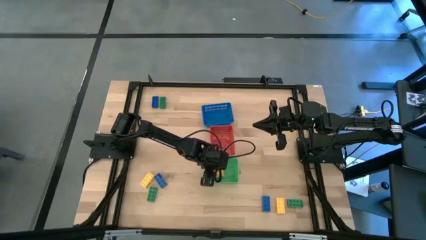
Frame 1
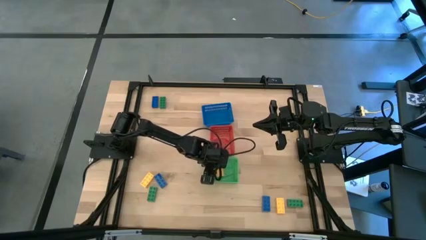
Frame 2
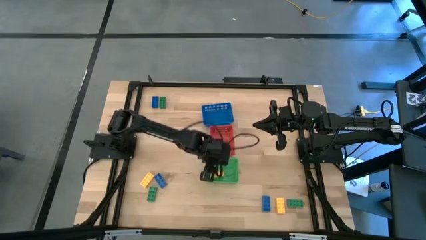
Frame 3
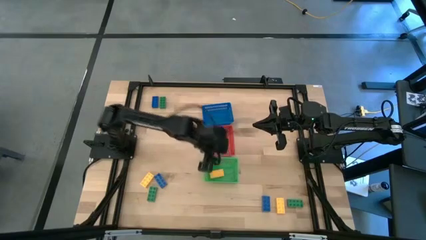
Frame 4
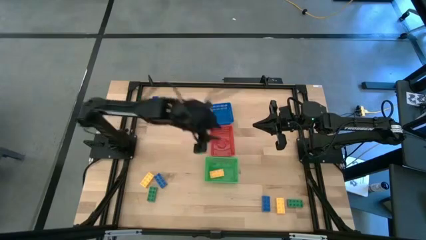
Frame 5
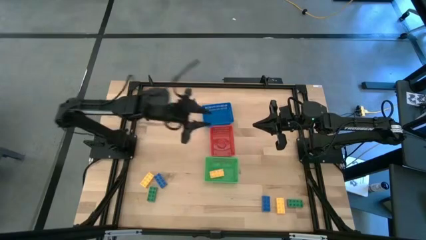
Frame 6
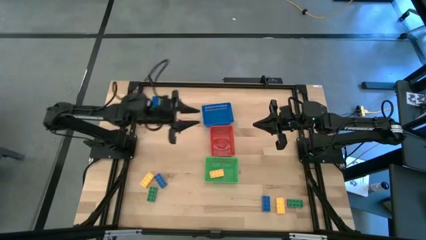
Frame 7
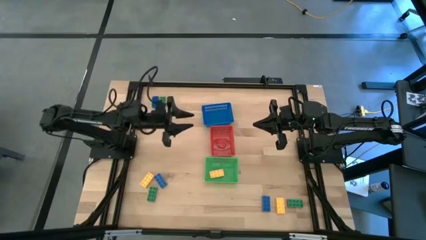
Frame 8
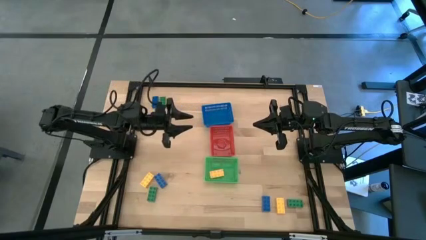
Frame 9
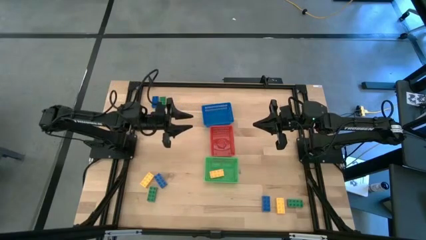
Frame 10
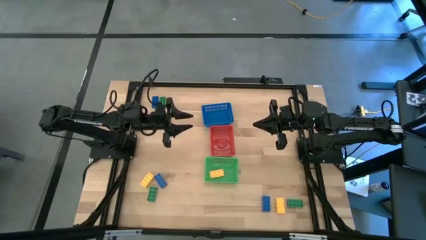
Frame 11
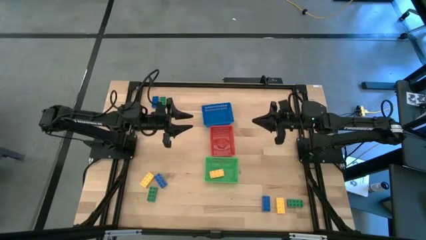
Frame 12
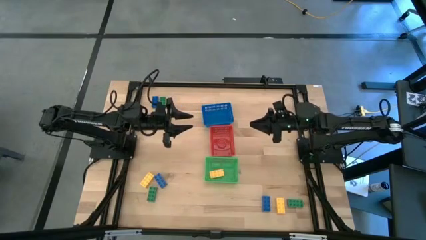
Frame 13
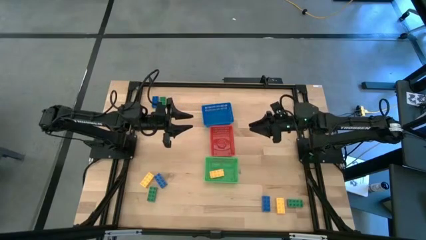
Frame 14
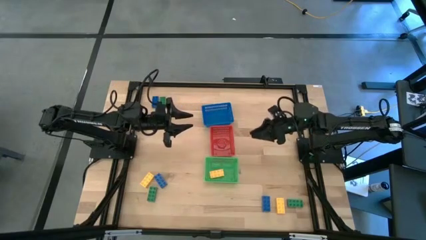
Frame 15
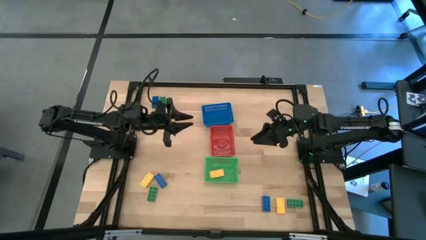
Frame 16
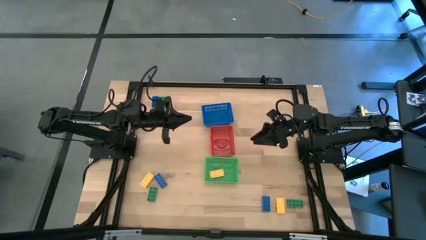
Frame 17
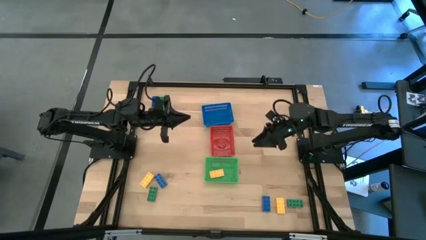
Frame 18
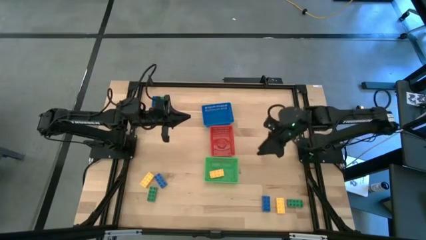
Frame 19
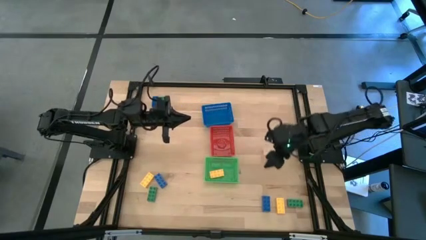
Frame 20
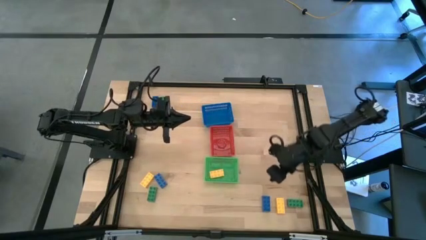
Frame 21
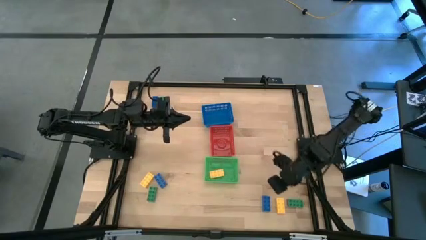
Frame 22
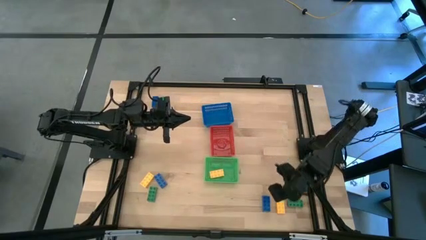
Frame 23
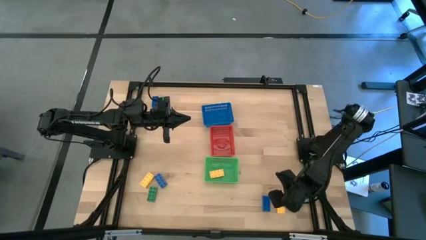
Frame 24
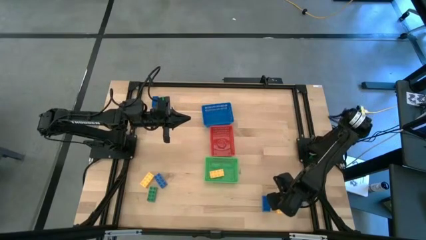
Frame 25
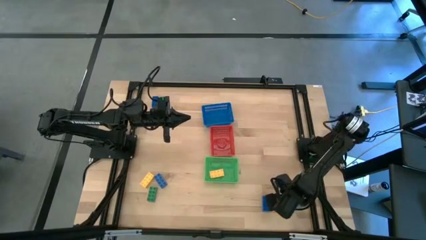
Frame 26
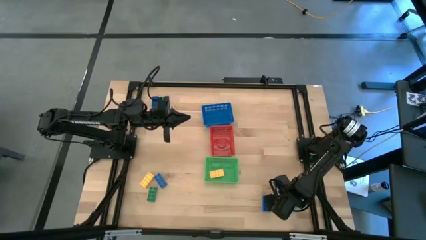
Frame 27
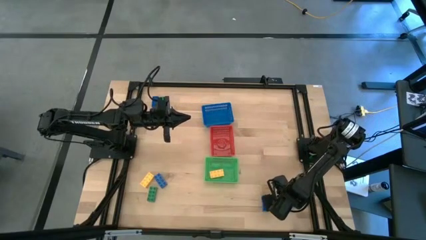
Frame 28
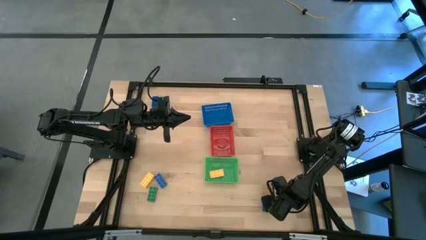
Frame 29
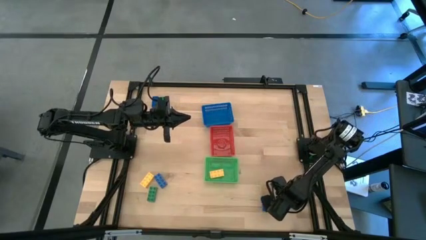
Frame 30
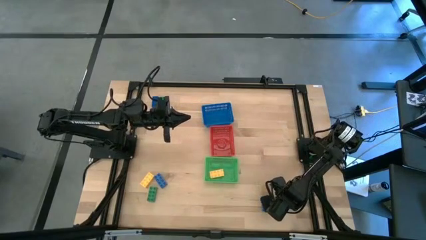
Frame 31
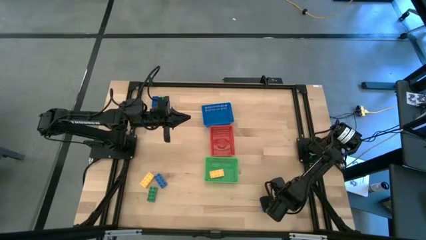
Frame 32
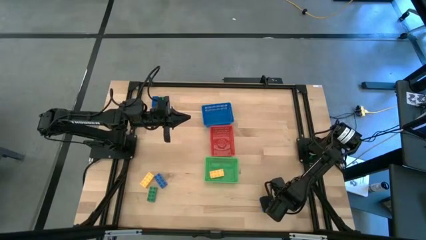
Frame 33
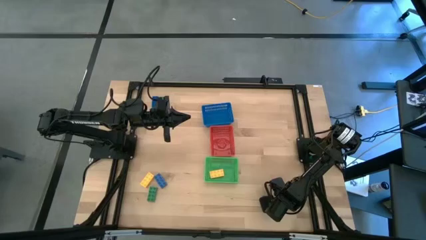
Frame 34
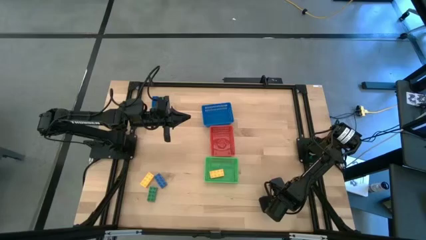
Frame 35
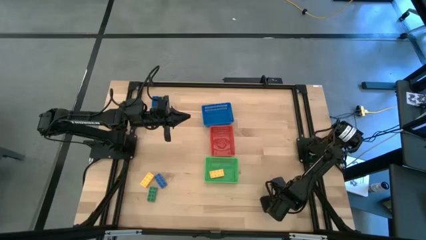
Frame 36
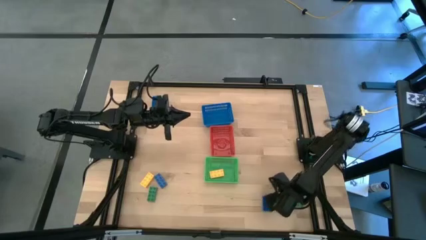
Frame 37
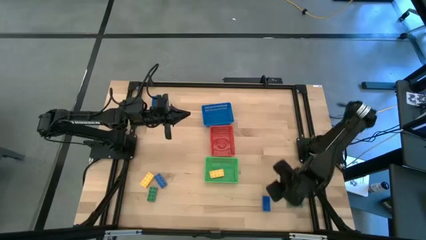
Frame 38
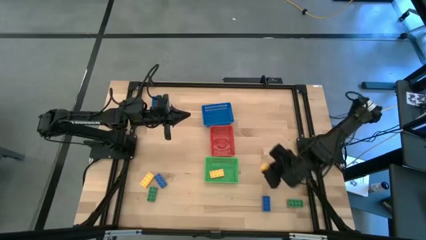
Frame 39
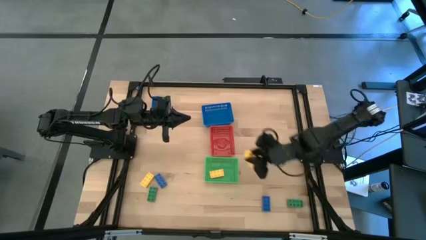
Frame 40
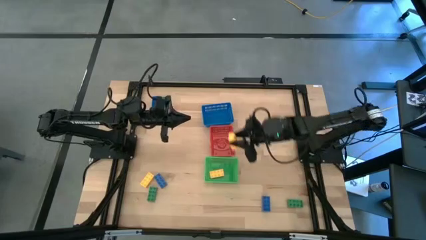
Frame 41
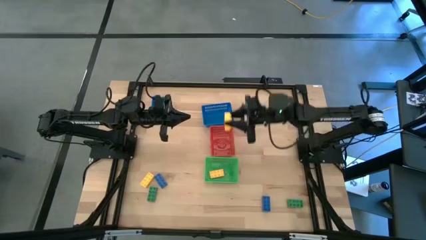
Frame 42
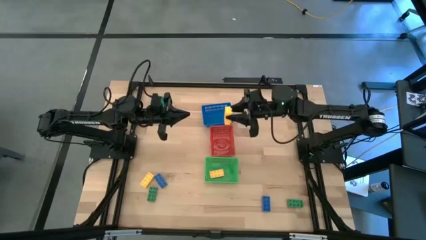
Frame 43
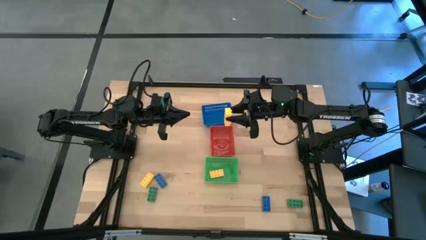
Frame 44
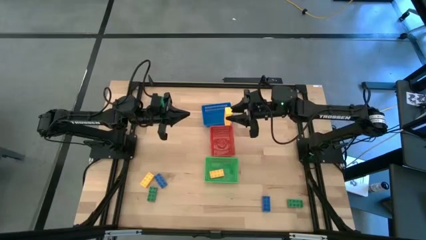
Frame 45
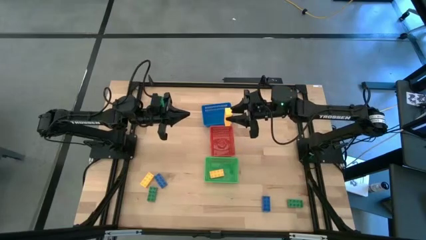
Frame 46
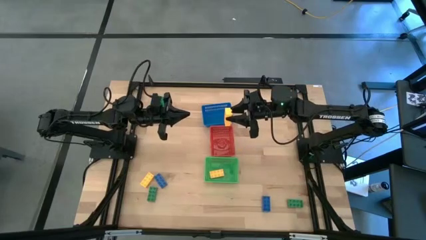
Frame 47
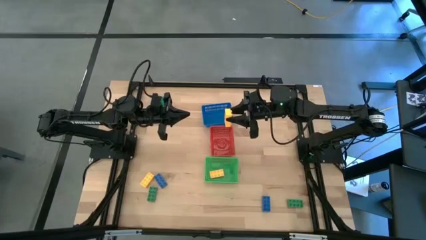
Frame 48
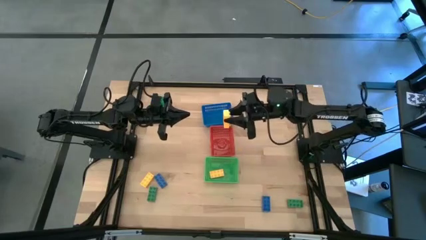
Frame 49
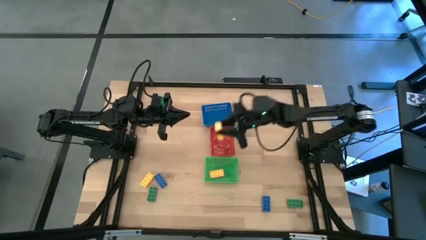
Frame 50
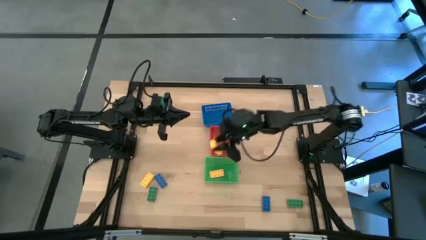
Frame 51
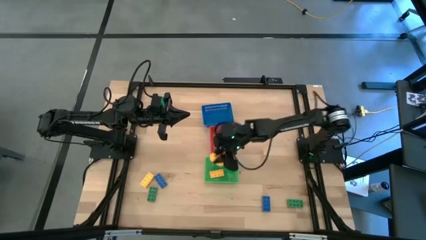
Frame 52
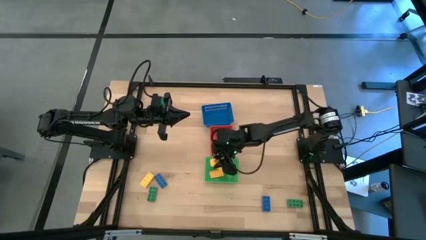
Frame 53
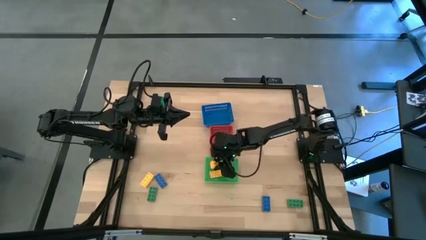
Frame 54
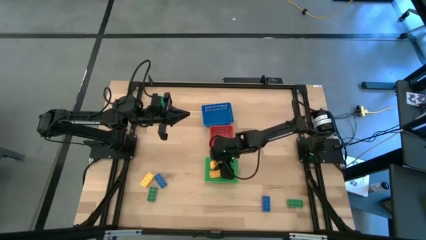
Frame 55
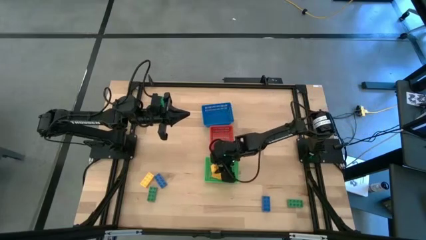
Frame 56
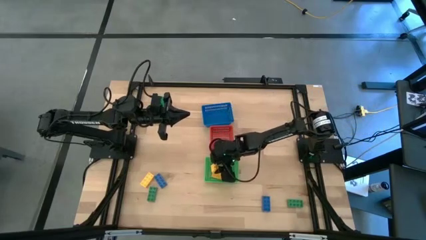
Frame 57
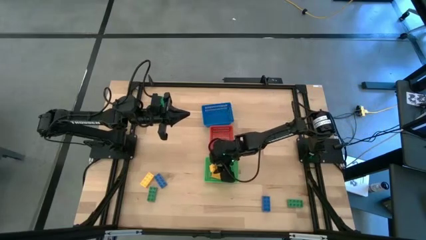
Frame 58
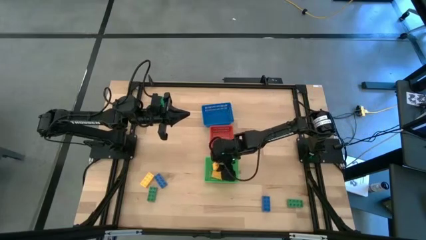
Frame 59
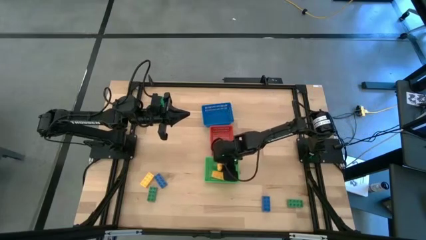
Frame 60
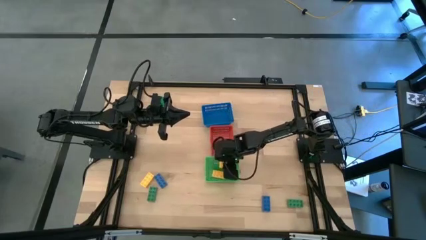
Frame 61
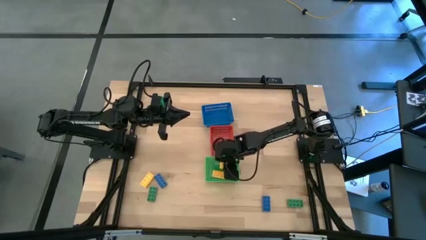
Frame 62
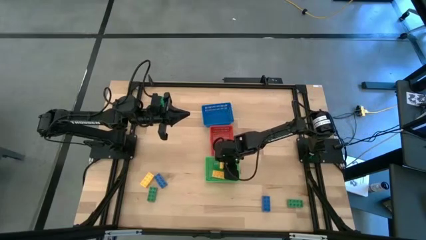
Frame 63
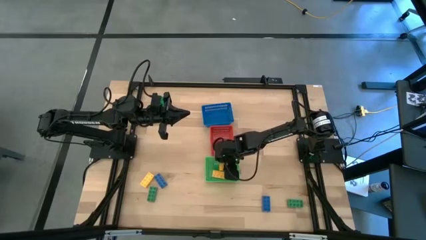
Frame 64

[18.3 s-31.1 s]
Task: Sort & place blocks by color
Put the right yellow game piece into the green basket
